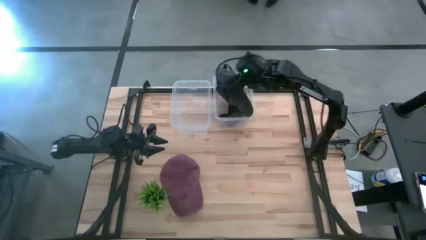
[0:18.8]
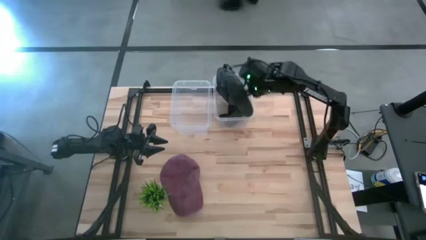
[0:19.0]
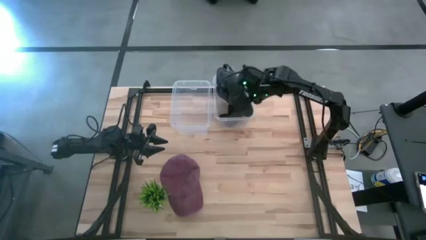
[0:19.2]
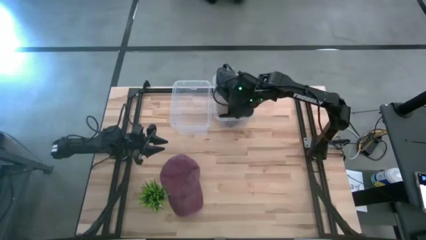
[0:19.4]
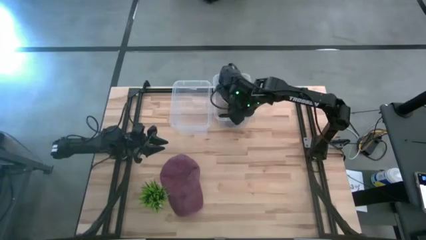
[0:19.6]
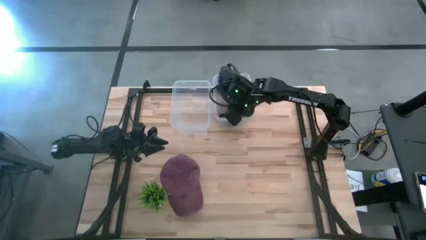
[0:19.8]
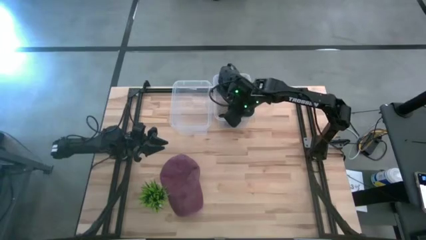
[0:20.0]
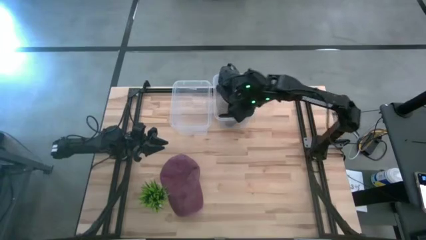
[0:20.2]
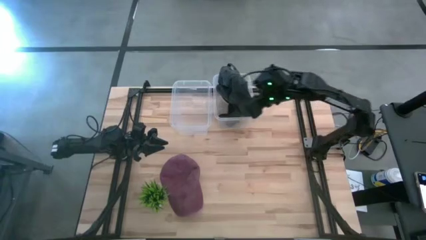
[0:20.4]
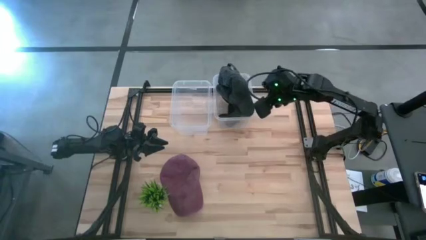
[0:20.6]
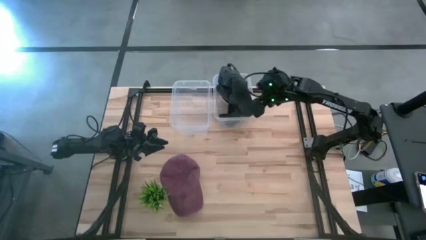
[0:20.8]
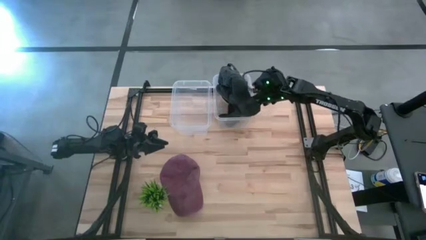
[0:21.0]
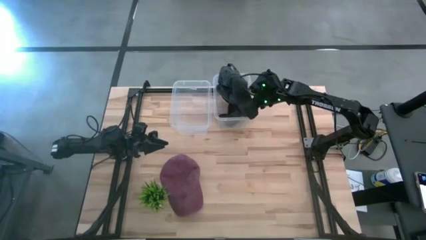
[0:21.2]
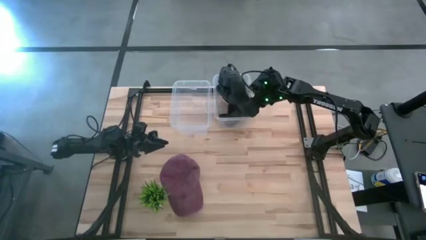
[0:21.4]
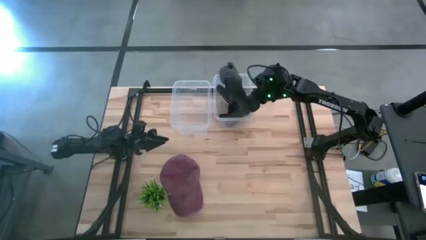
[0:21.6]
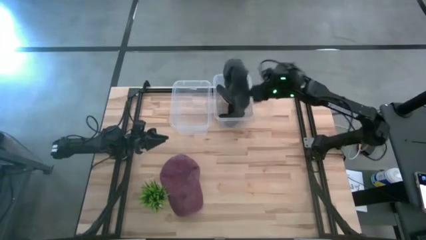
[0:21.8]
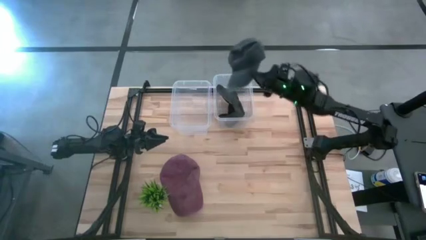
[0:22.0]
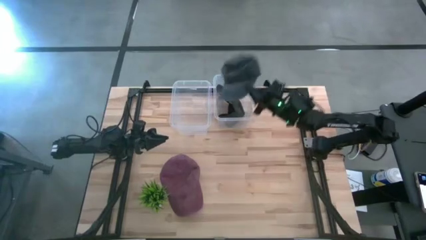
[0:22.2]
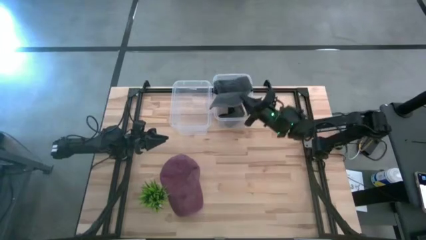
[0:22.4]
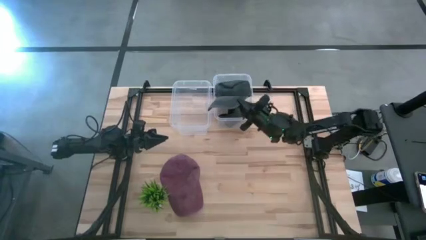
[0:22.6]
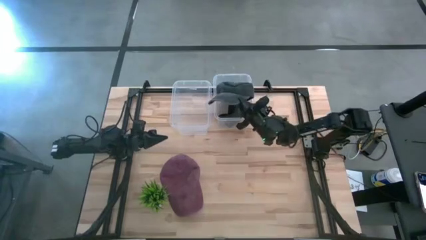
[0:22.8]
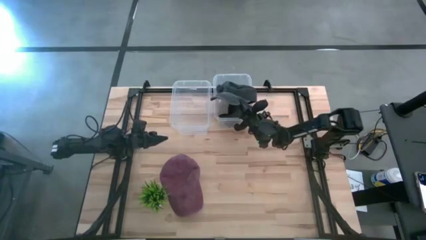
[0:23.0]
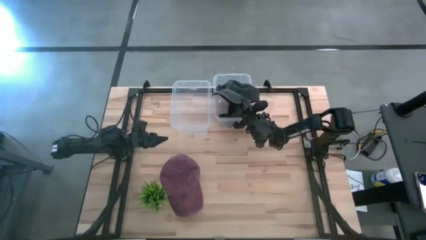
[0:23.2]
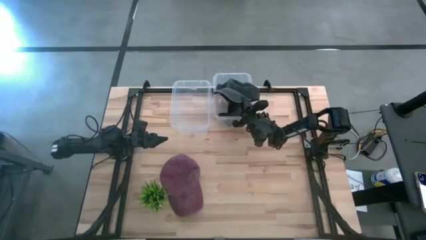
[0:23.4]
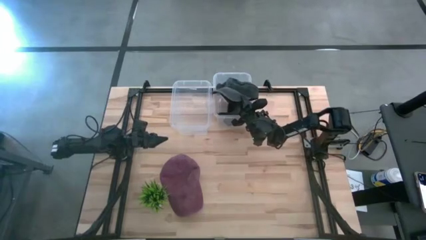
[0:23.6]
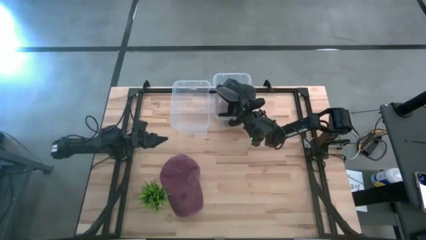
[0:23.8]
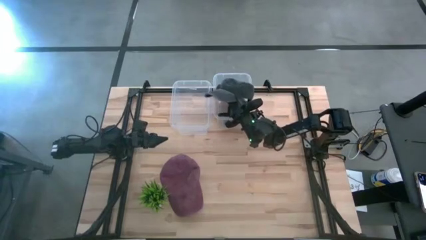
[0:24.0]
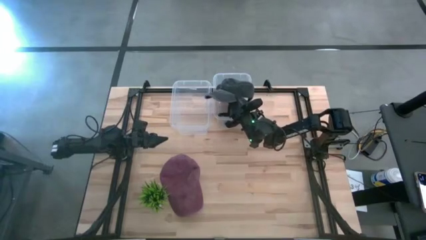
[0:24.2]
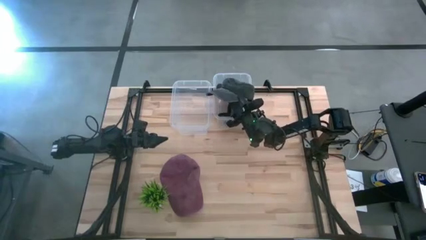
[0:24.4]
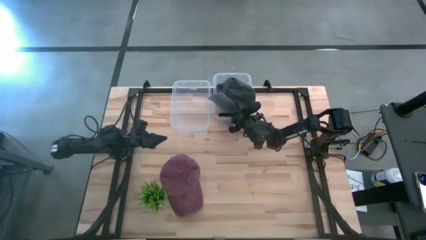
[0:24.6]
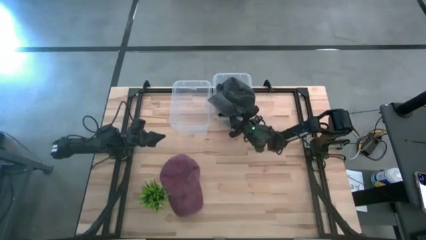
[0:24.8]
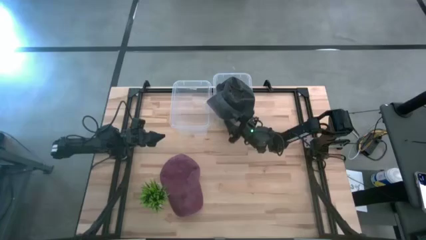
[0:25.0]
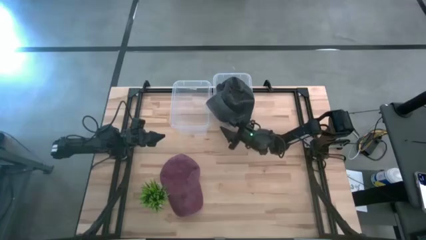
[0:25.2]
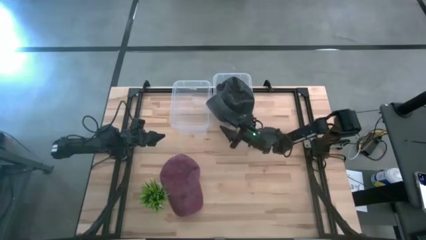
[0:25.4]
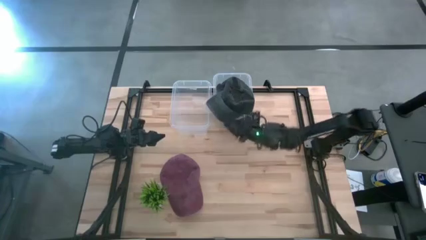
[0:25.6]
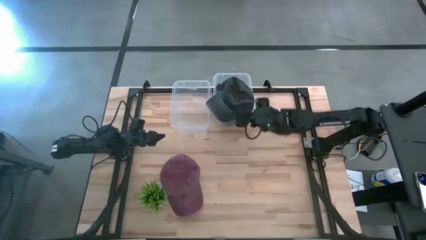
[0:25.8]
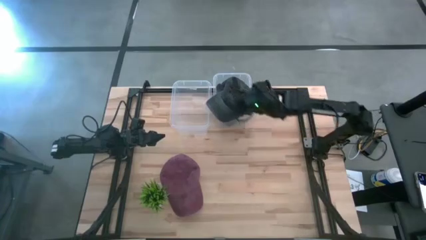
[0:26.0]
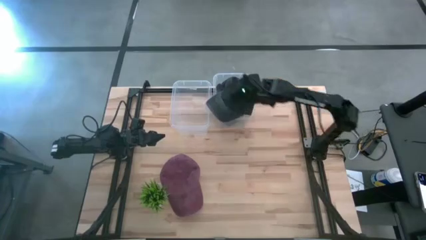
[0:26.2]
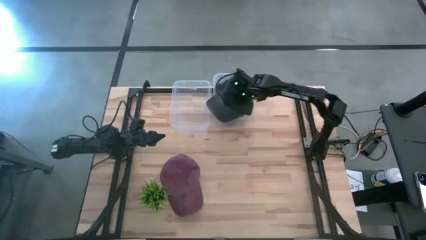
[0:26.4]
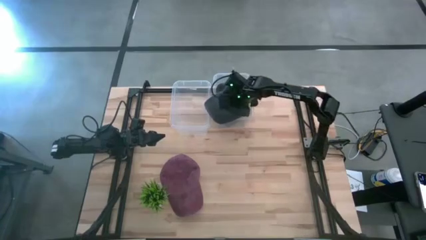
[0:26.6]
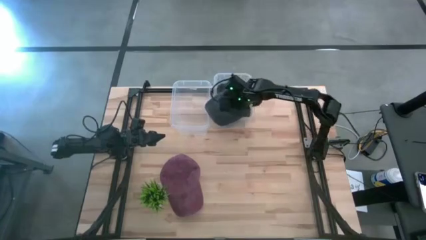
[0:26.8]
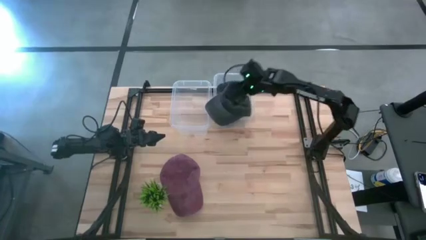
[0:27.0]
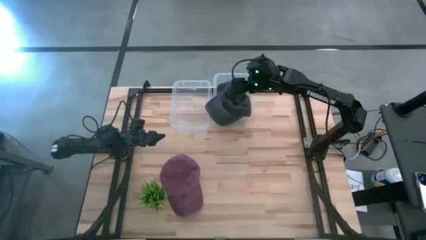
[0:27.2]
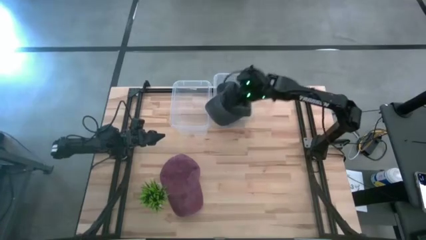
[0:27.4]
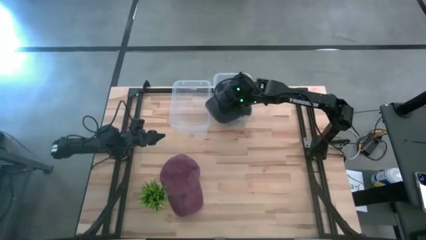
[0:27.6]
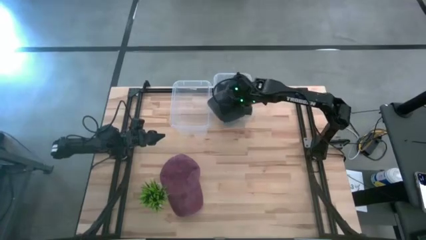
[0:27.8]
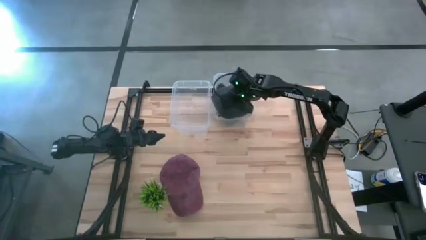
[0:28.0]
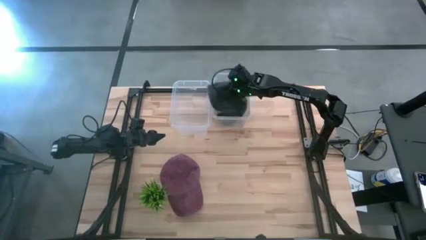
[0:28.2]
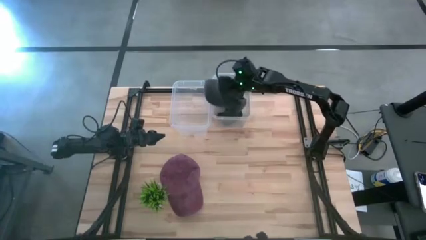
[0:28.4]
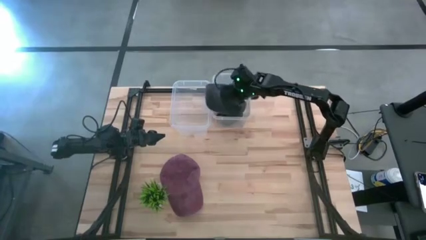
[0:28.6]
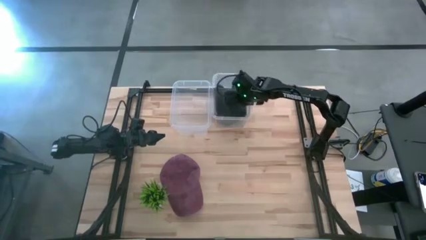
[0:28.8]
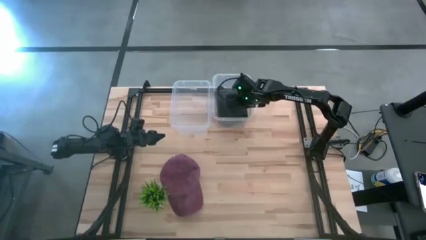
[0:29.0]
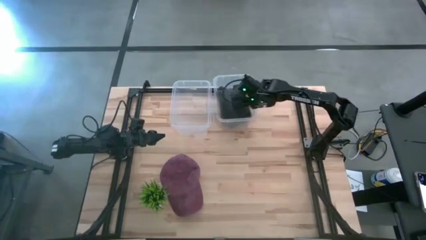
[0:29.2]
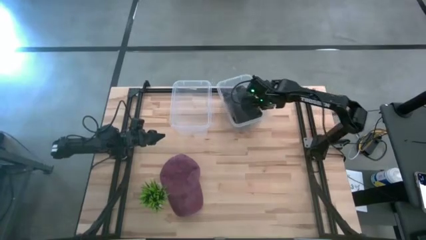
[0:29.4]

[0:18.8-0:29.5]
Task: Pick & Place hat
Put the black cap into the right transparent bin

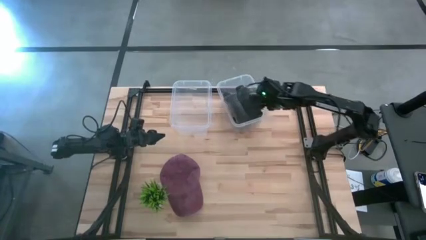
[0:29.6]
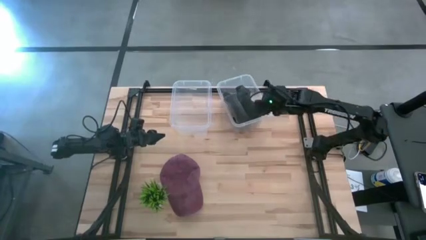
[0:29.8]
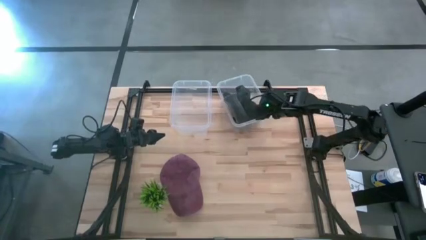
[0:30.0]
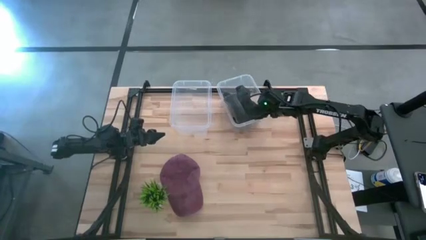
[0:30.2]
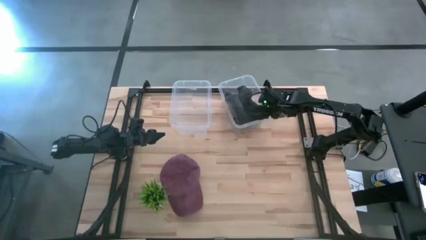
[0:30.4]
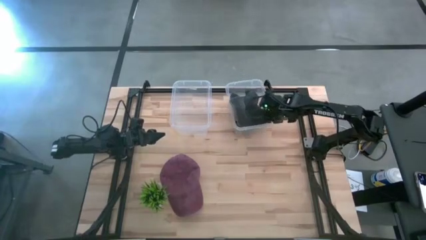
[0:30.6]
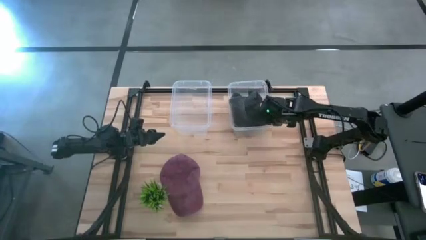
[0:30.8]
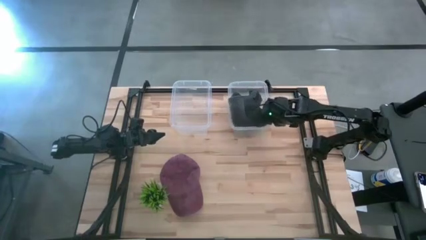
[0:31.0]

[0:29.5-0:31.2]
Adjust the right transparent bin

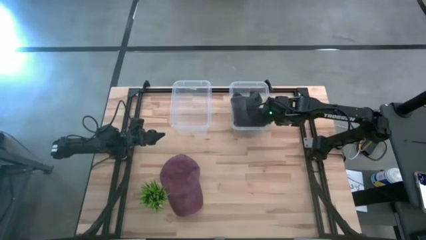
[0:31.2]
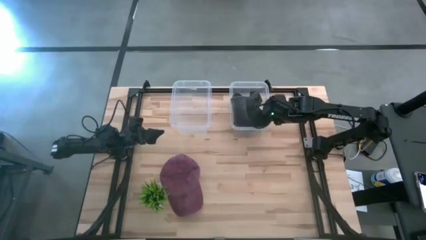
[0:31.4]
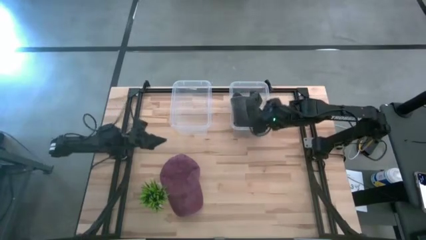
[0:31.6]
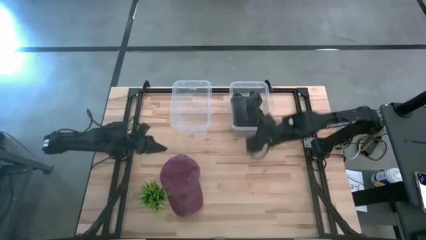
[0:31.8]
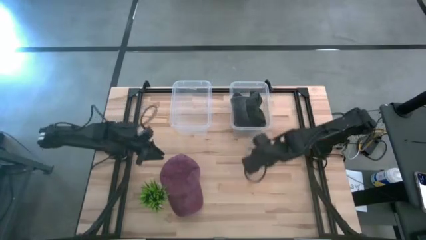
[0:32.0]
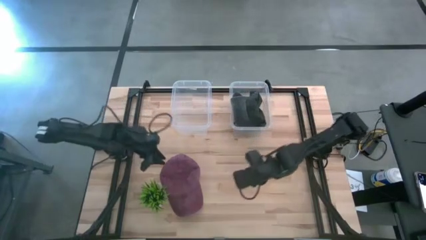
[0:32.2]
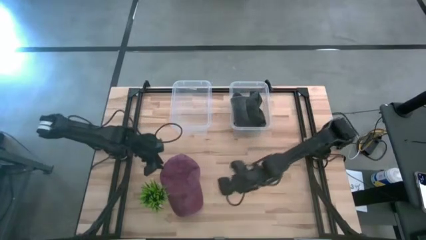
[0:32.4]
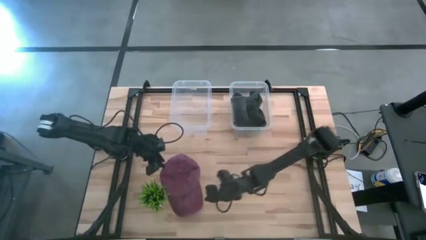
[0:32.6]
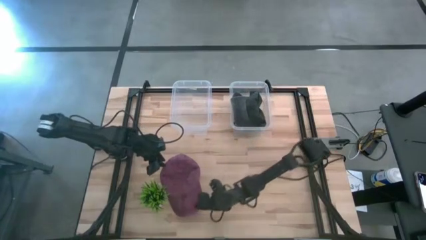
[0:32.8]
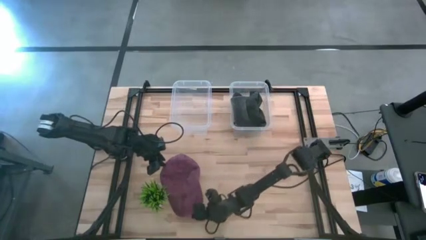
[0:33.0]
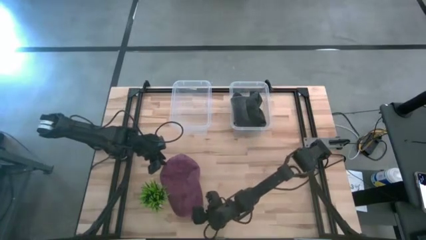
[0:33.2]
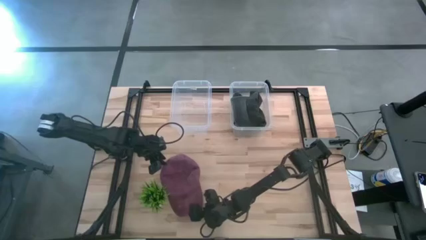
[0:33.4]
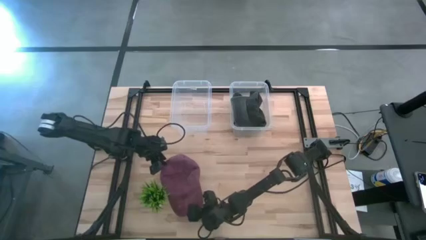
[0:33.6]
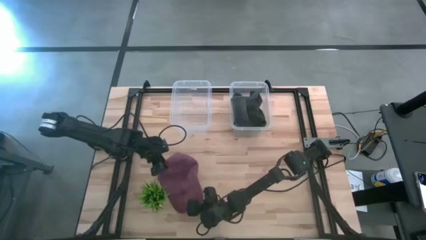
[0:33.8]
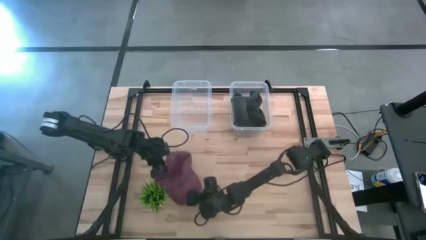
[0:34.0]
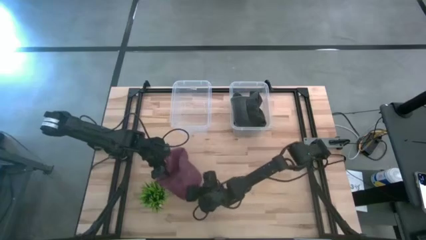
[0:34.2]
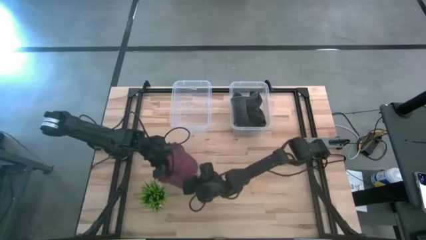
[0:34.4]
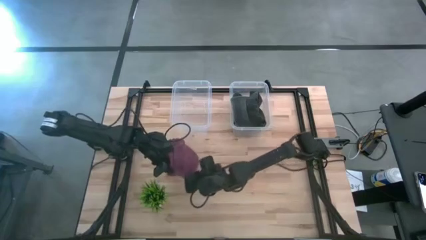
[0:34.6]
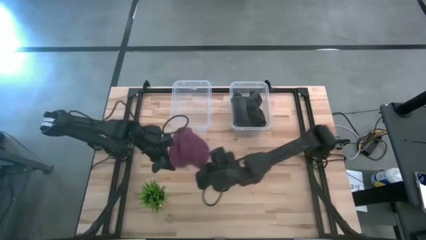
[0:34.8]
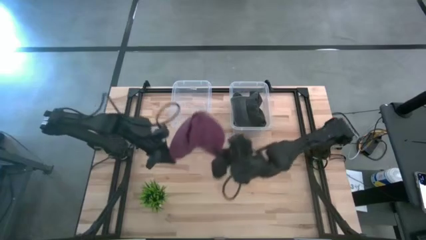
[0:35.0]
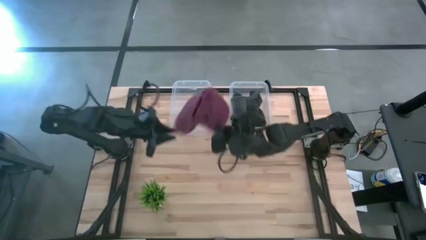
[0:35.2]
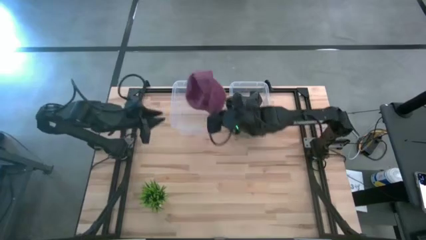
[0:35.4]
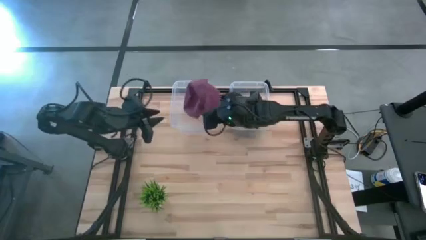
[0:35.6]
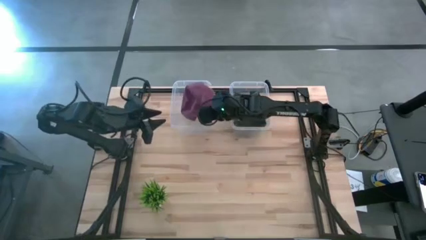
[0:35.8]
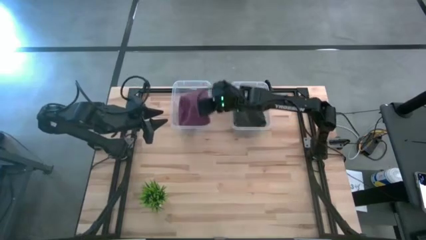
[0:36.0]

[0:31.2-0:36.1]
Put the dark red cap into the left transparent bin
